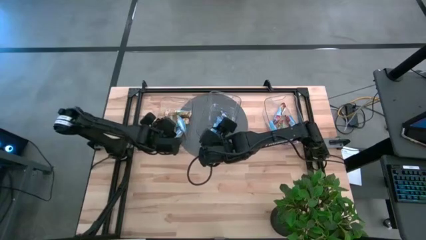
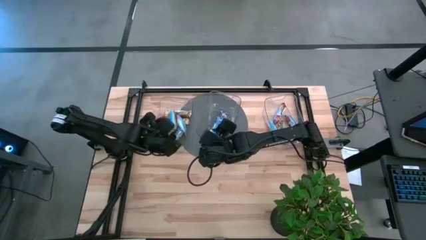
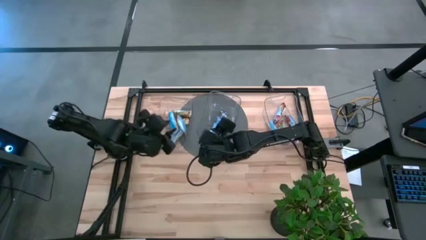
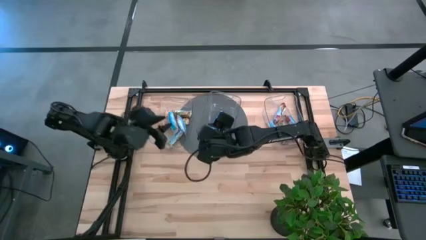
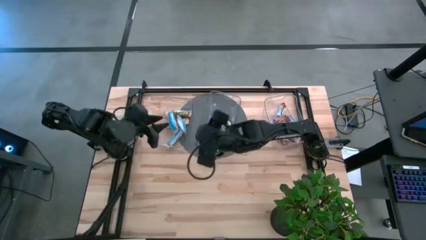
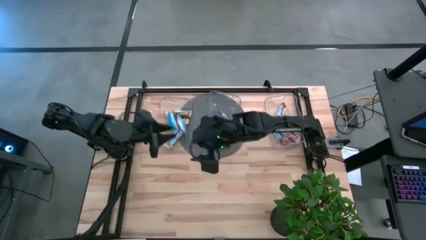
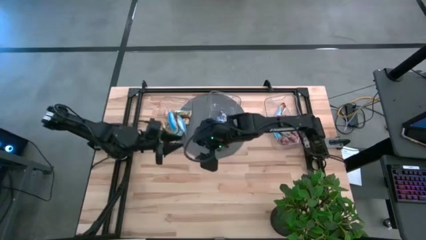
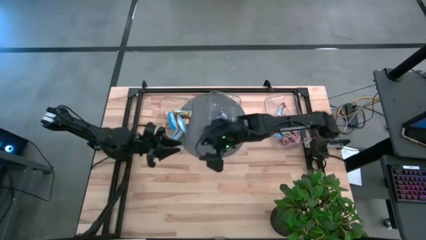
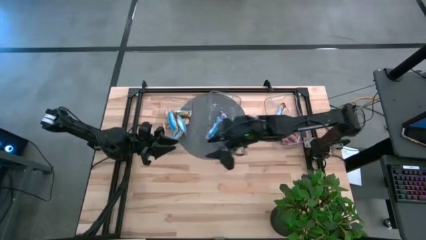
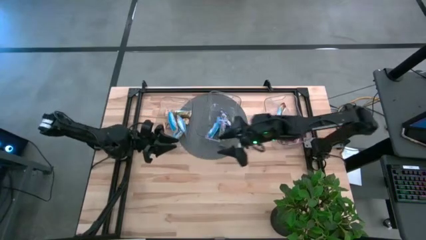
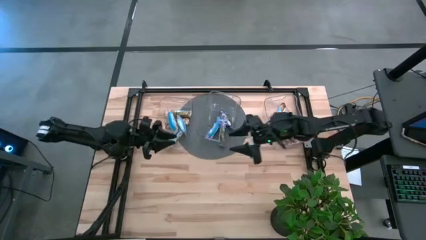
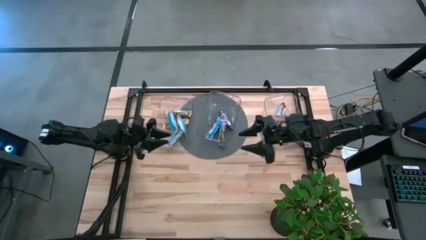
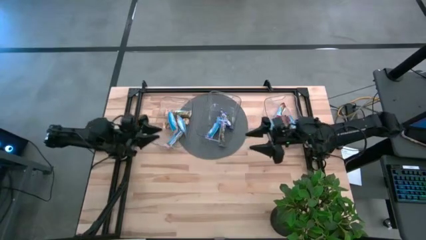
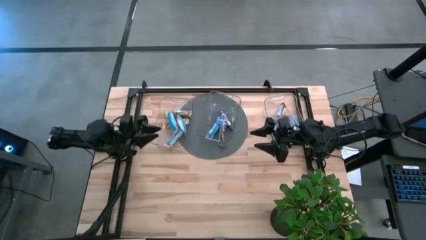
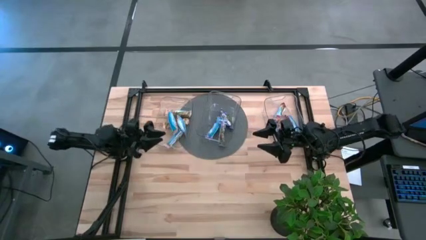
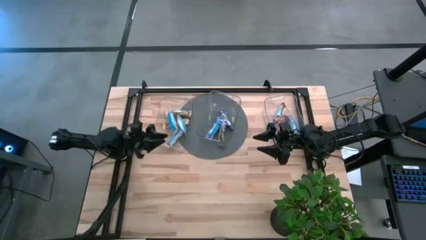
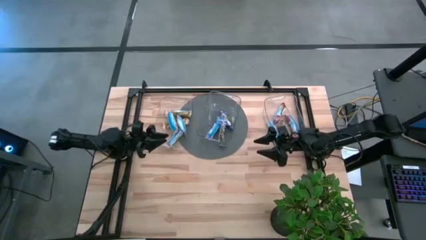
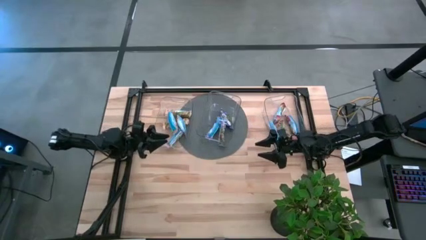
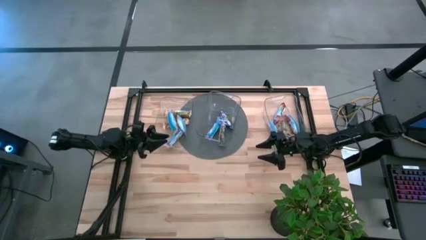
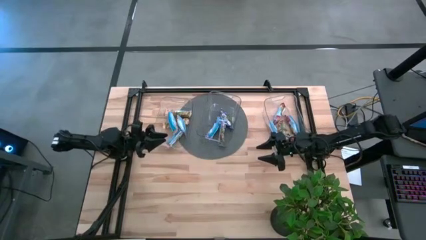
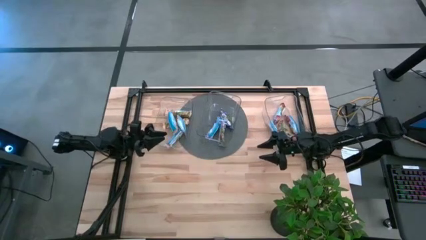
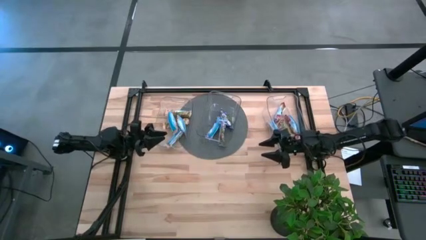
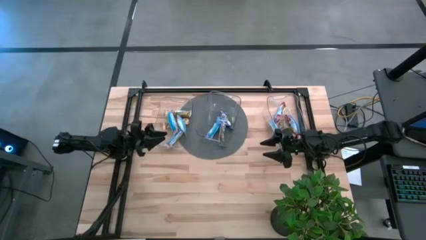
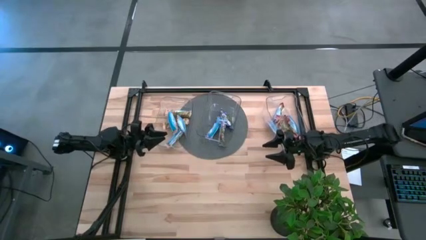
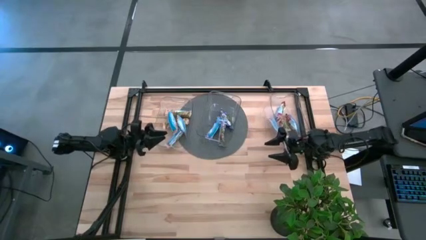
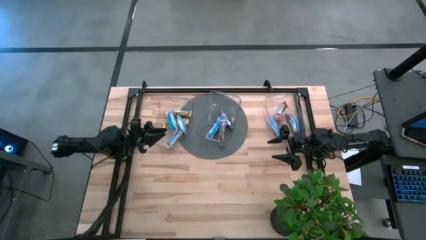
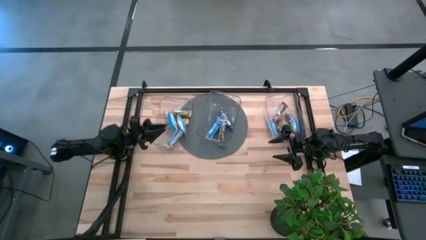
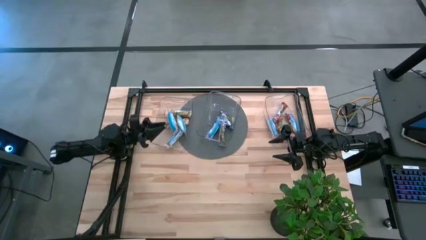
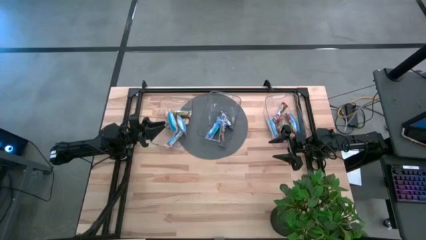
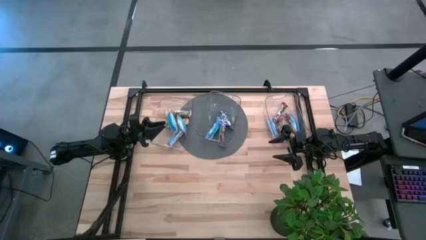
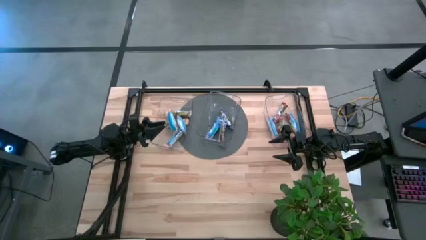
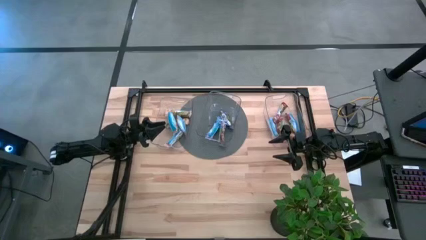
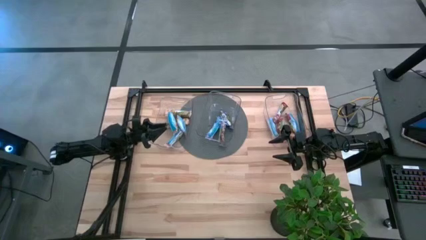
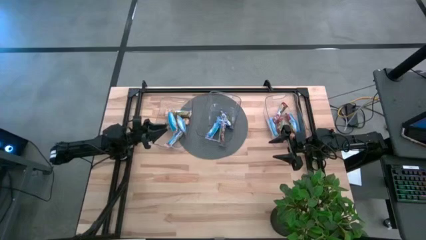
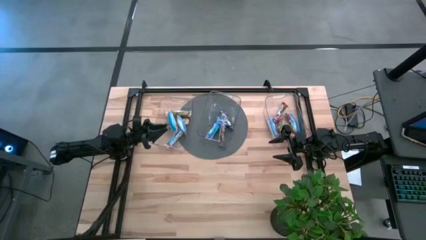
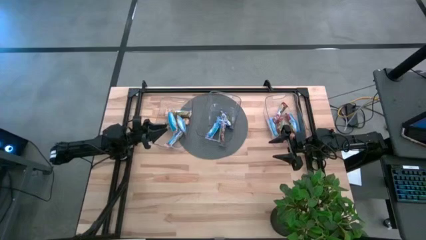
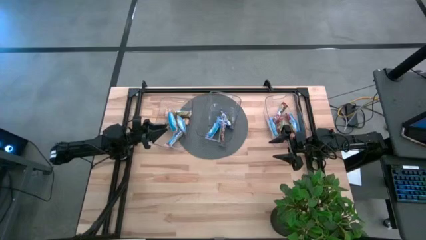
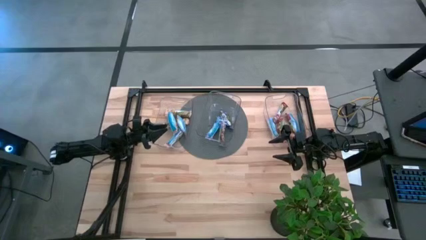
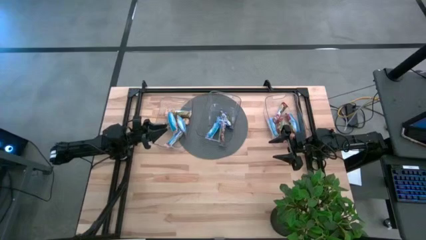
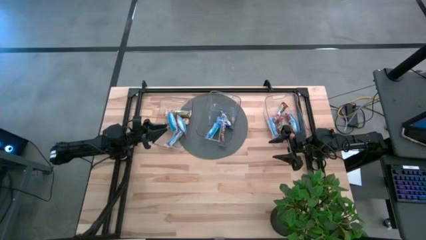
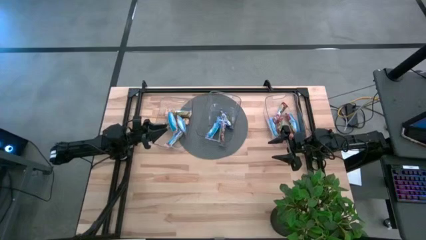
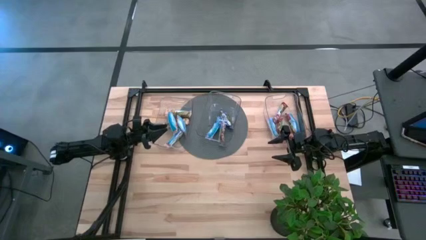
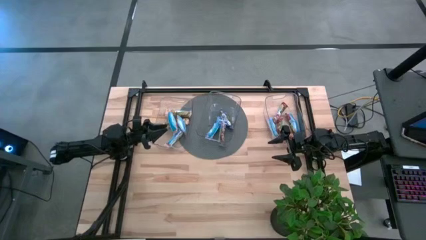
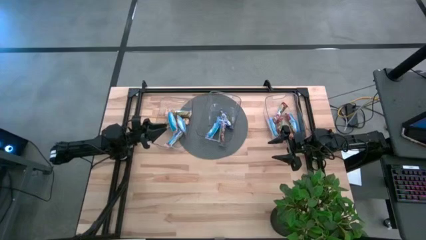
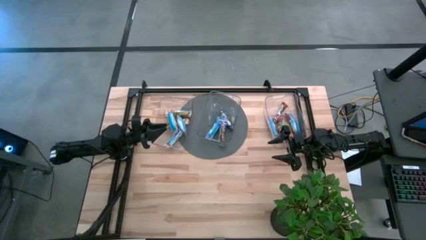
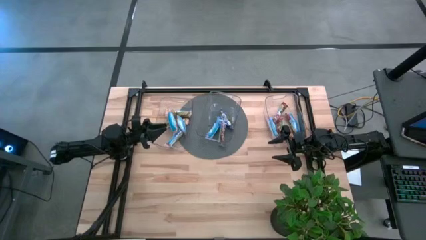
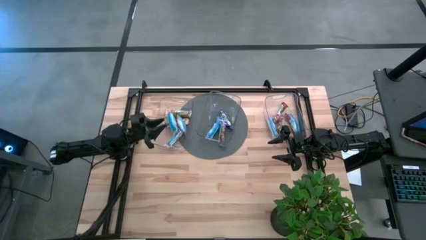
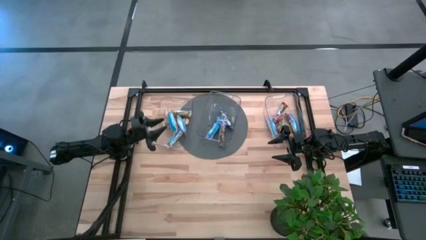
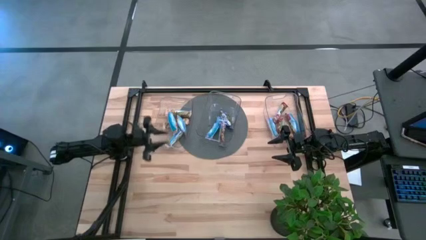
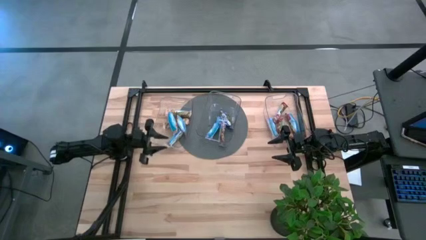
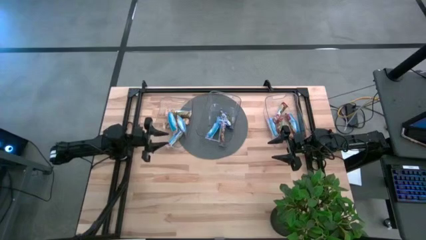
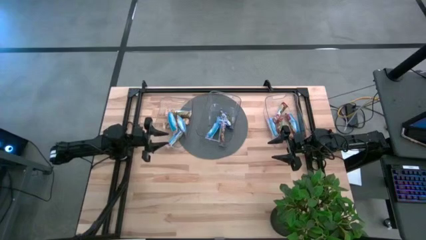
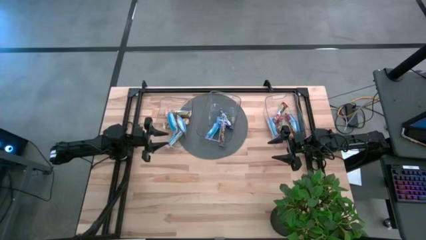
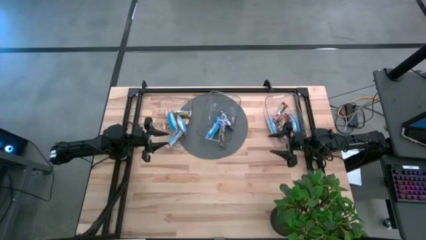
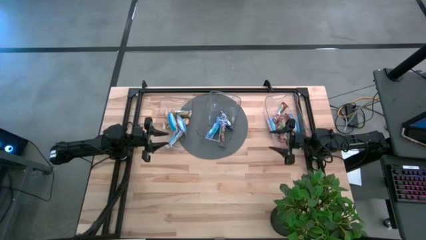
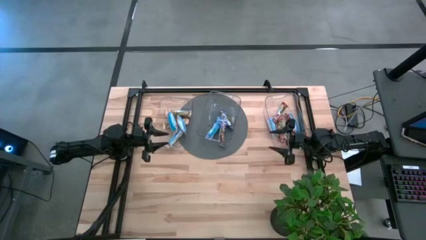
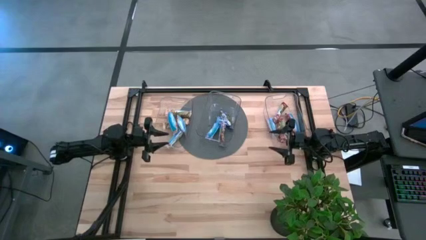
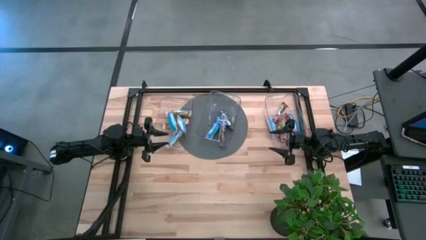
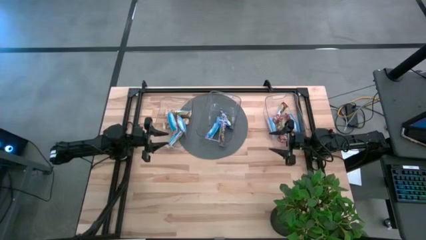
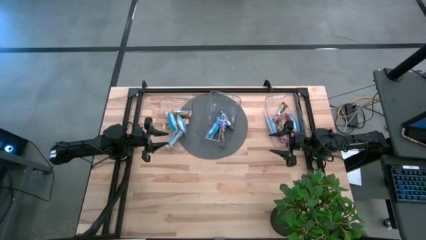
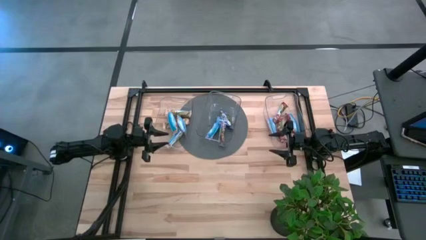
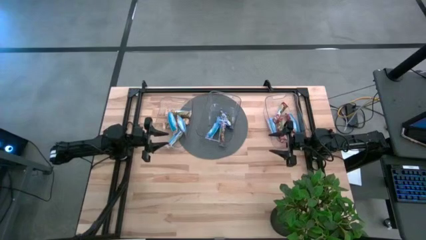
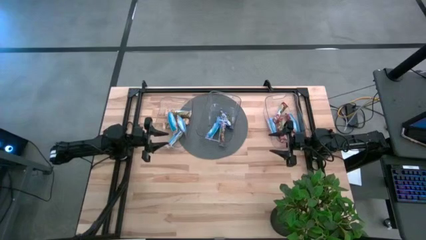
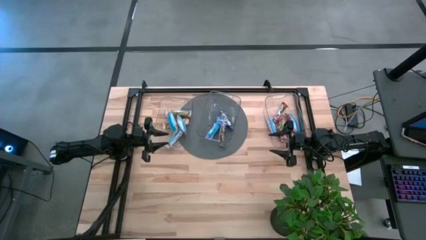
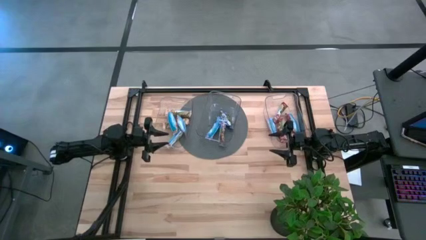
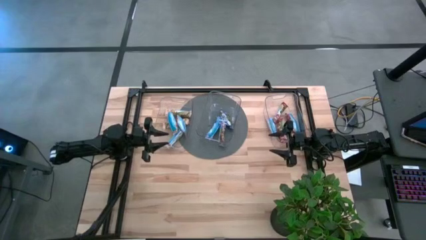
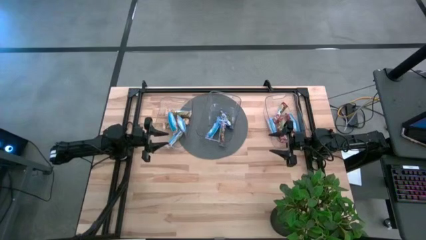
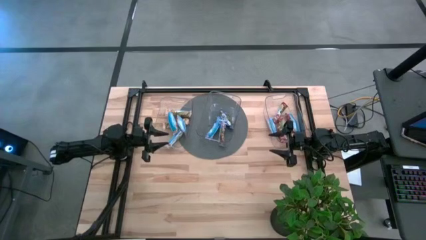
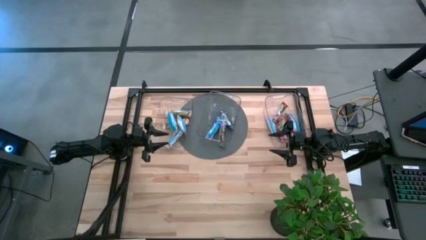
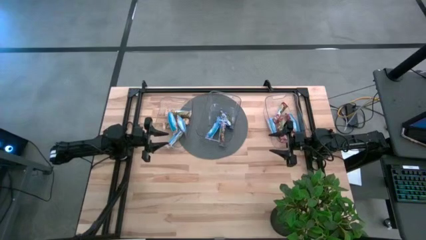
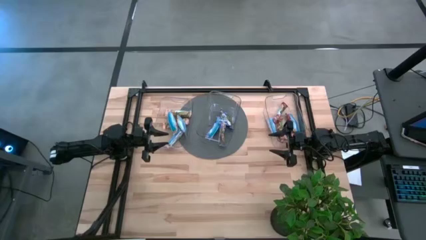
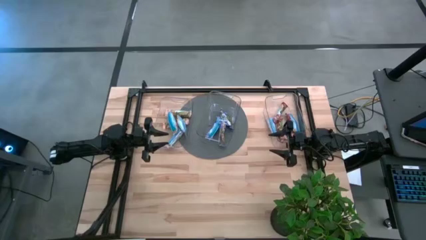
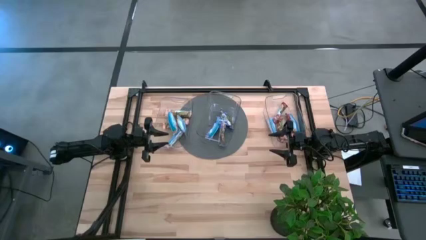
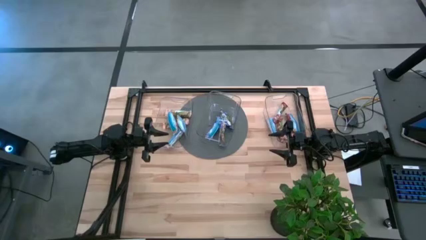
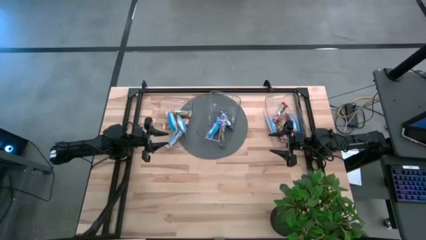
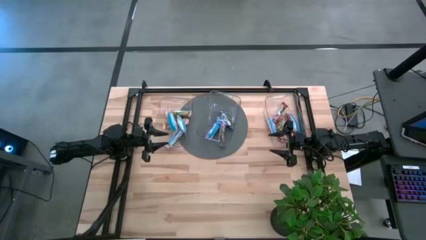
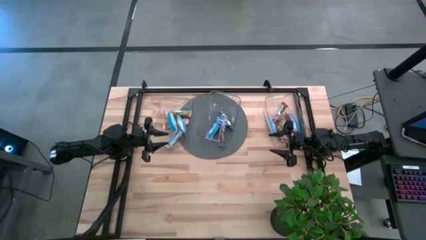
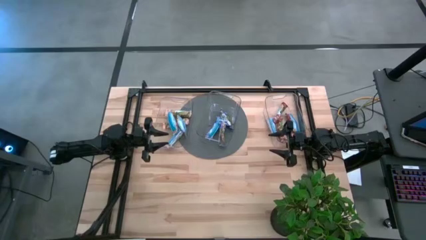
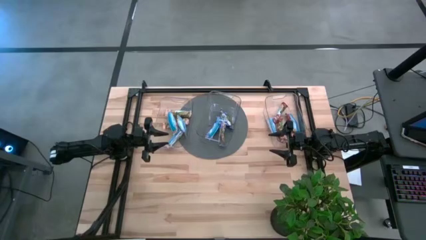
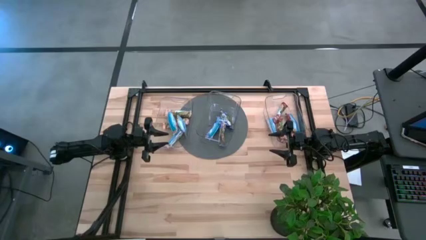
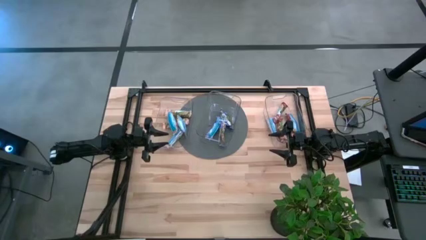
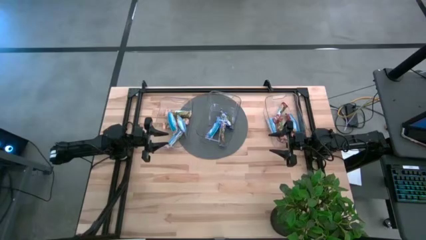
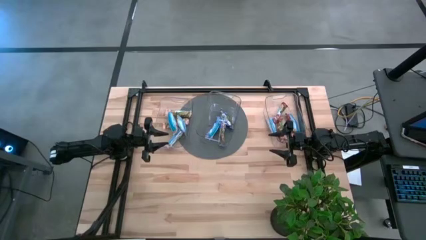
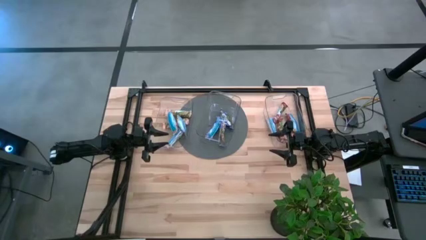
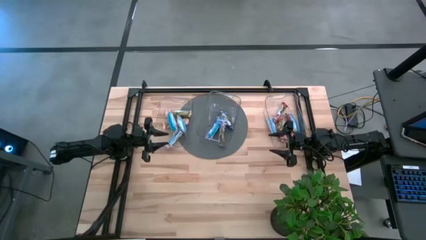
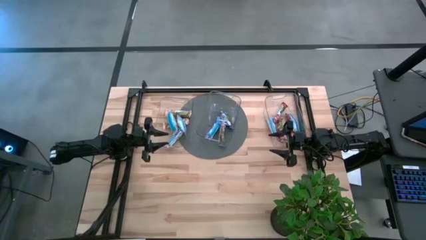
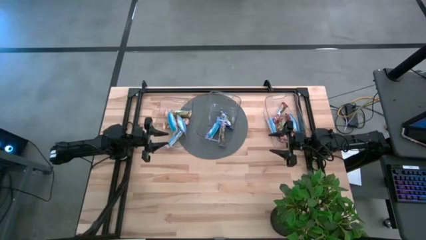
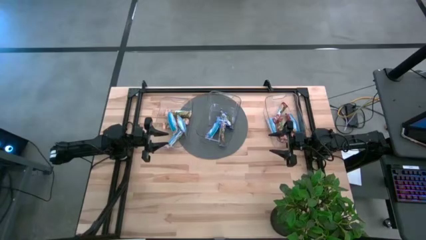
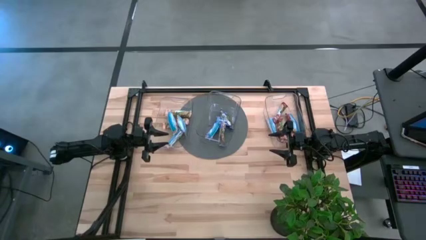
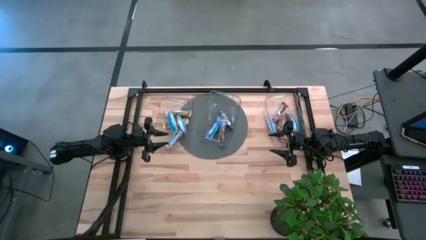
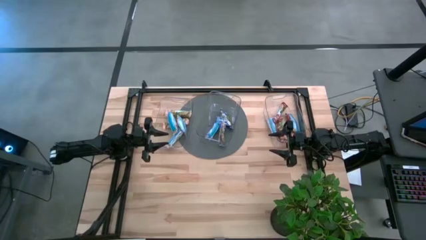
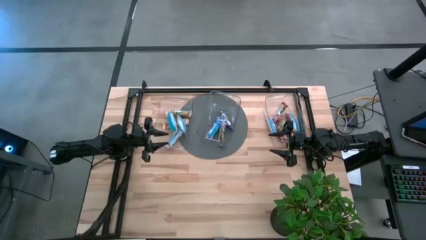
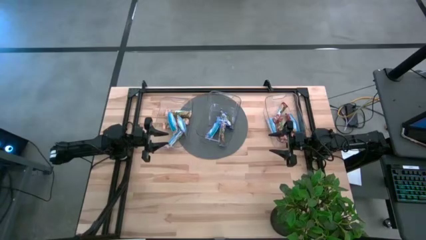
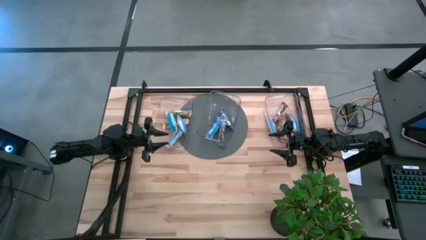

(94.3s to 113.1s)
Task: Pick and place Granola Bars by type
Return to Home Position
